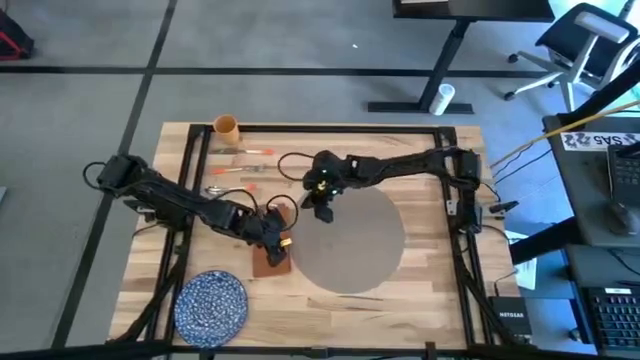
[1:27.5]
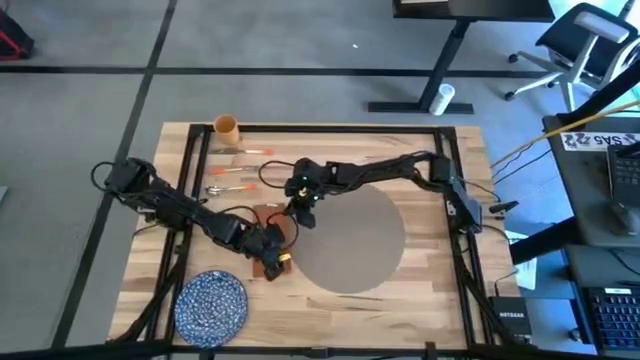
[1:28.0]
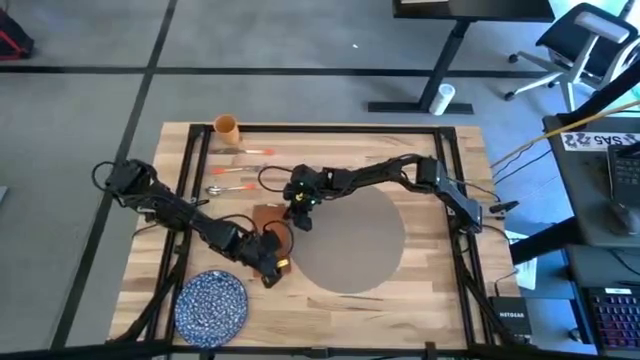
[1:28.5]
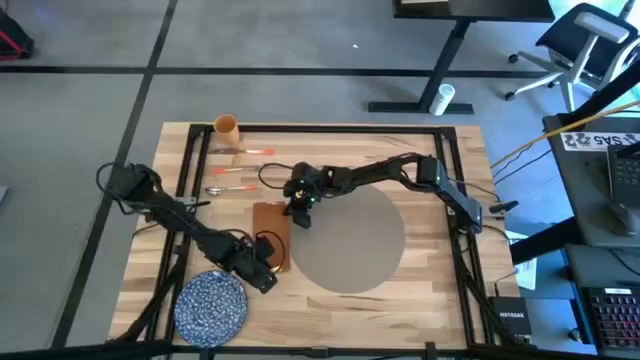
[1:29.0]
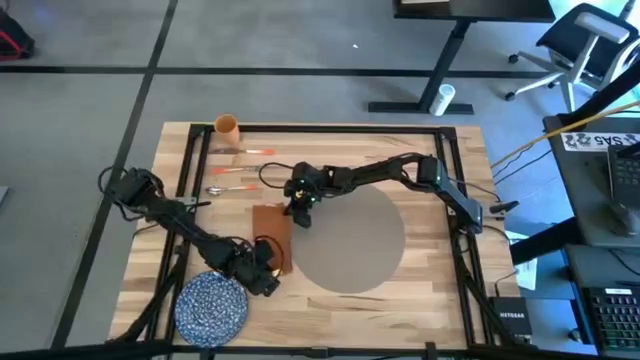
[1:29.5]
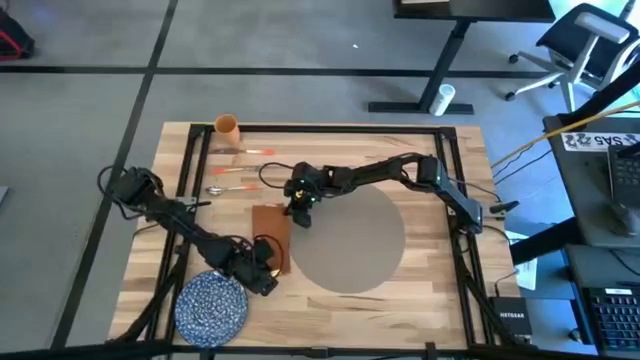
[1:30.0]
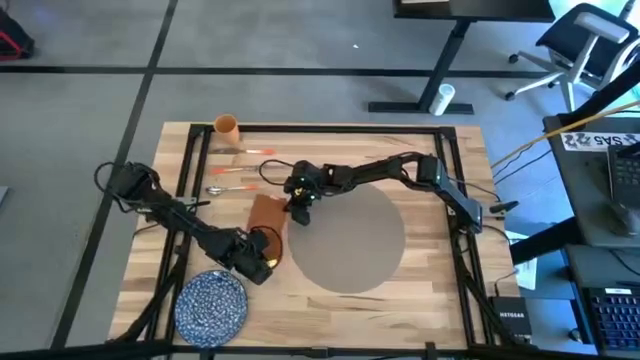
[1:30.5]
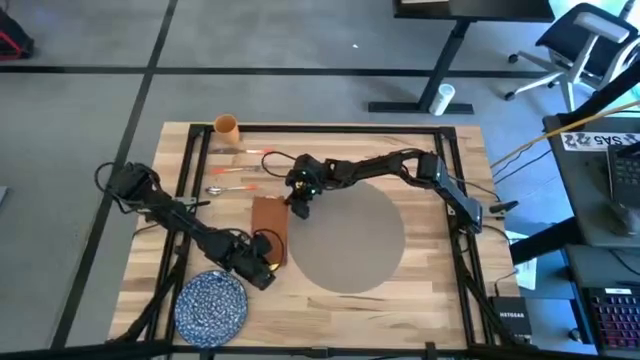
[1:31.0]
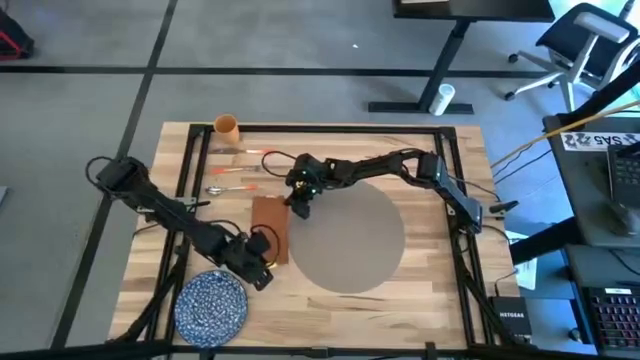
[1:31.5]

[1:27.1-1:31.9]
Task: Set table place
Adjust the orange napkin

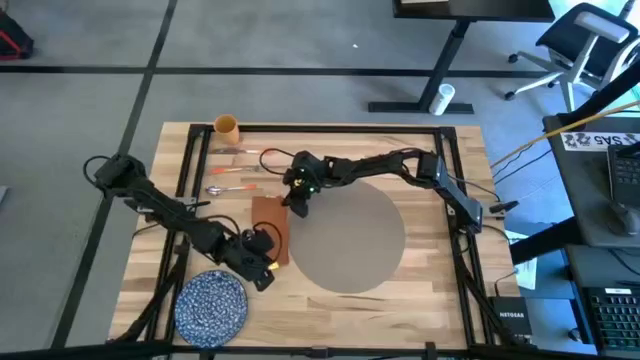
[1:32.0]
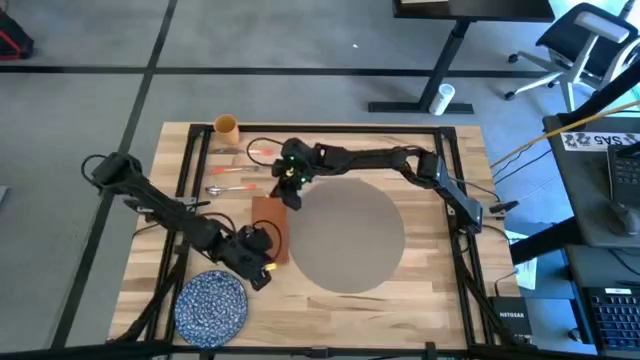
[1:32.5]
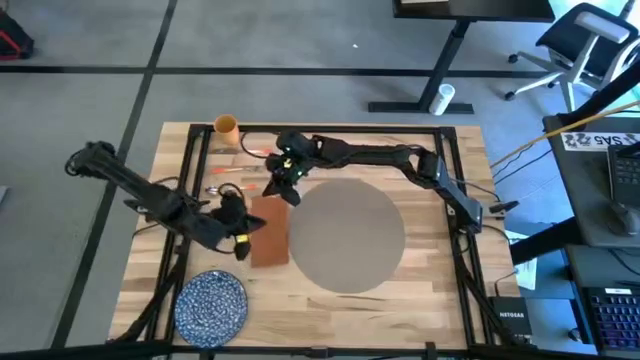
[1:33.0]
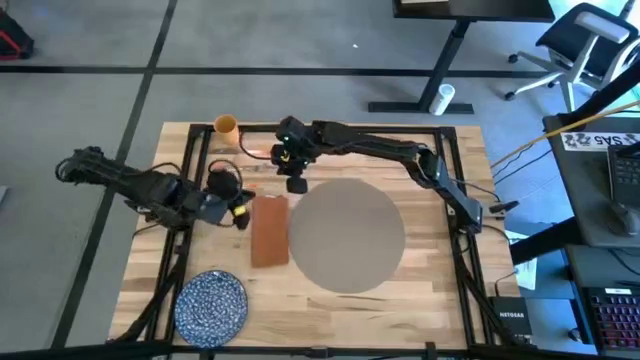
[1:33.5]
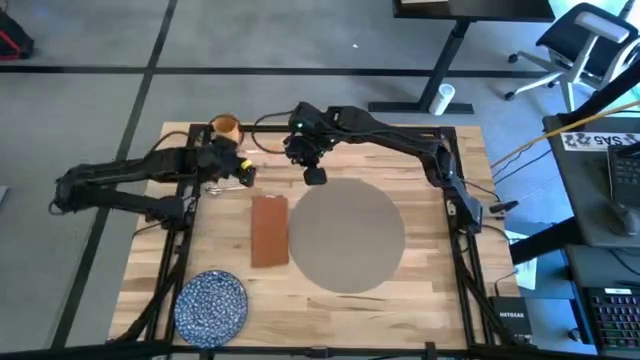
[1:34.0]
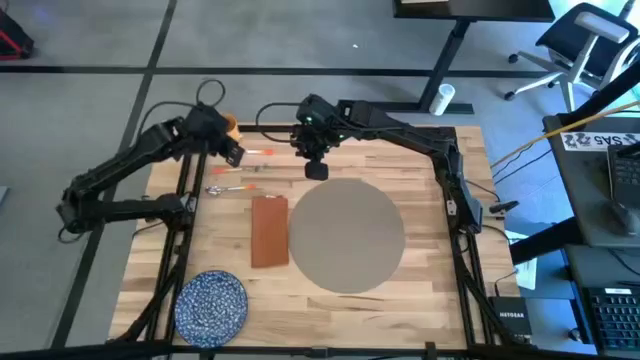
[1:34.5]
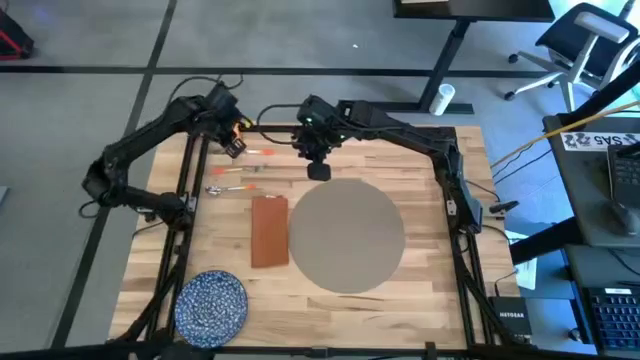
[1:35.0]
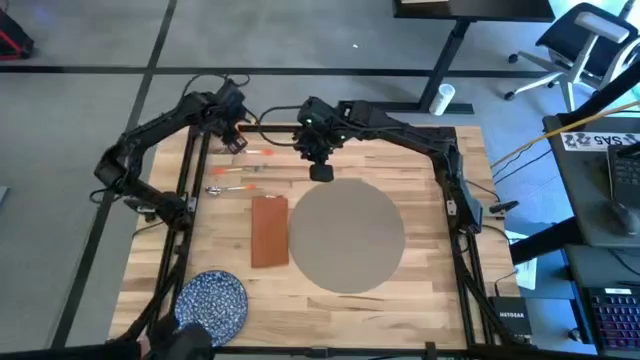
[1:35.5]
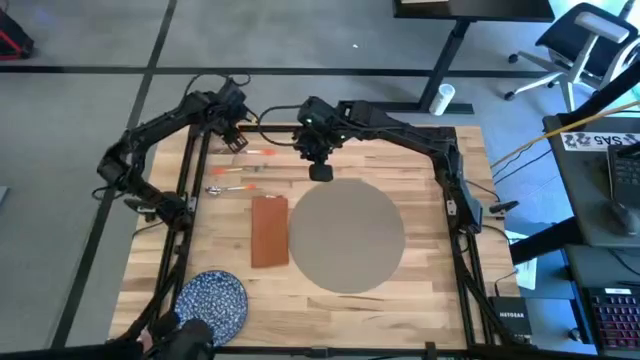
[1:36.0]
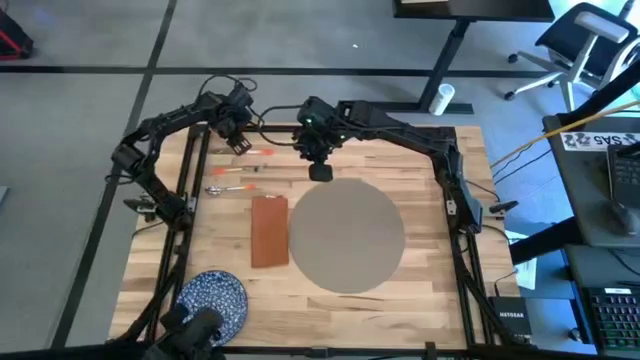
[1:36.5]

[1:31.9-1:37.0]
Move the yellow cup to the top right of the table

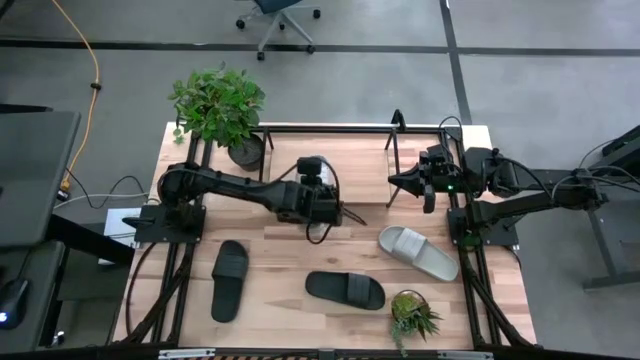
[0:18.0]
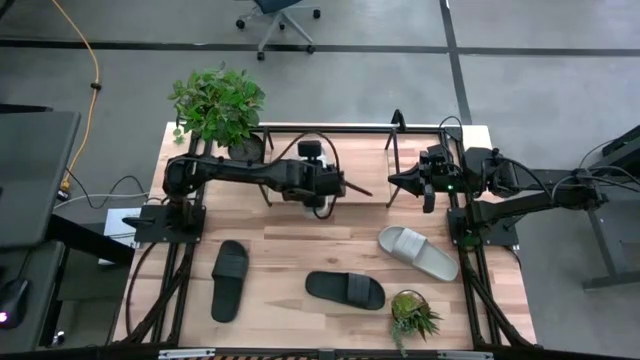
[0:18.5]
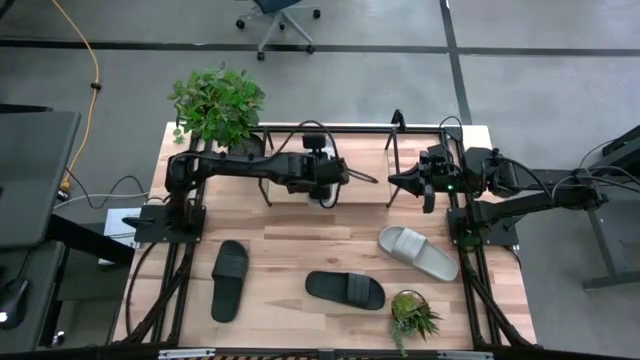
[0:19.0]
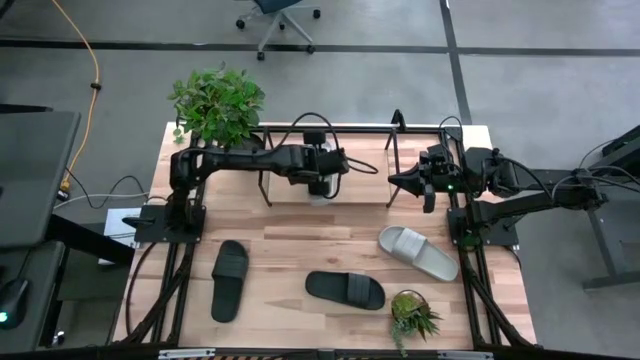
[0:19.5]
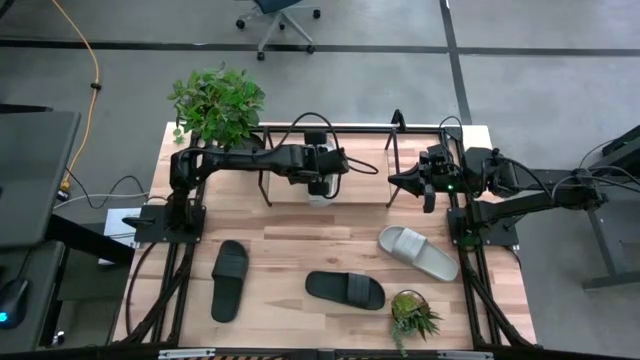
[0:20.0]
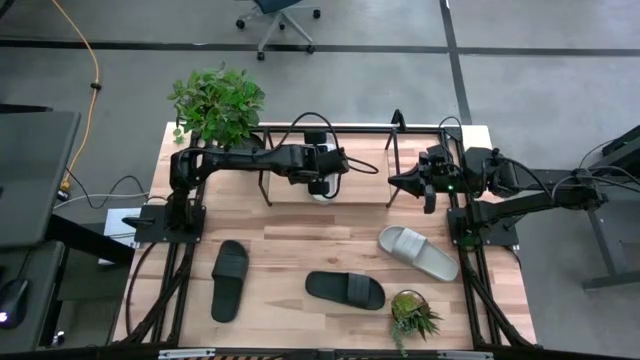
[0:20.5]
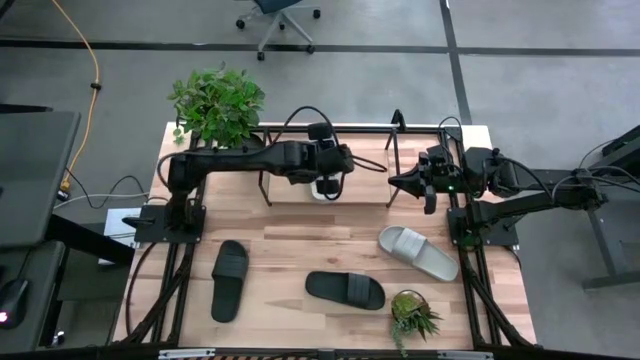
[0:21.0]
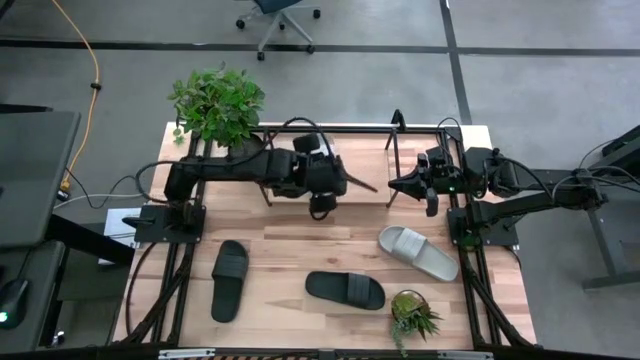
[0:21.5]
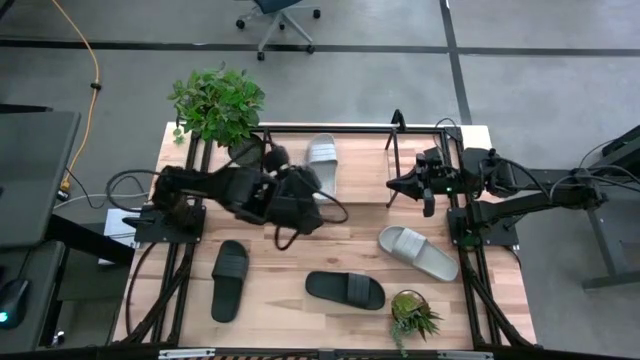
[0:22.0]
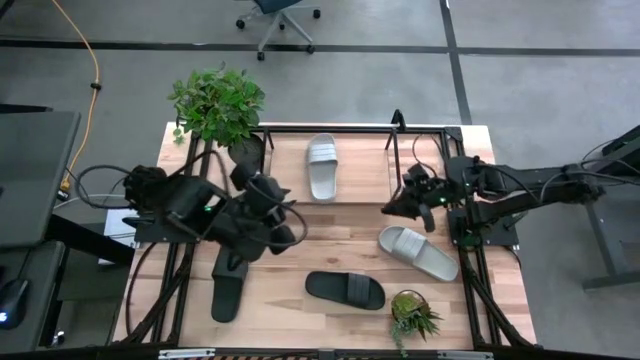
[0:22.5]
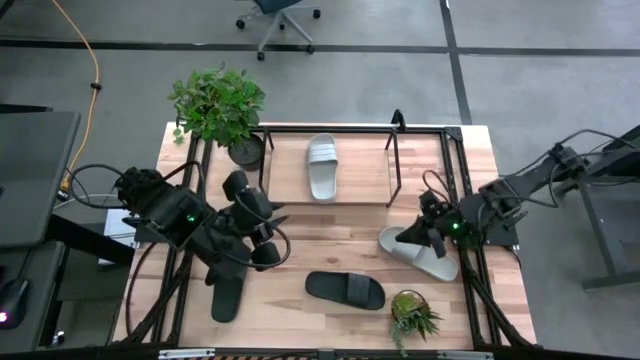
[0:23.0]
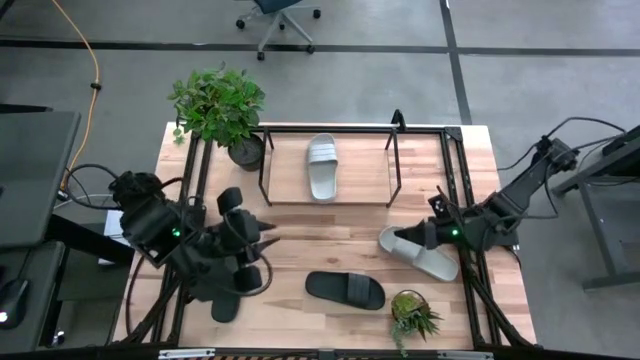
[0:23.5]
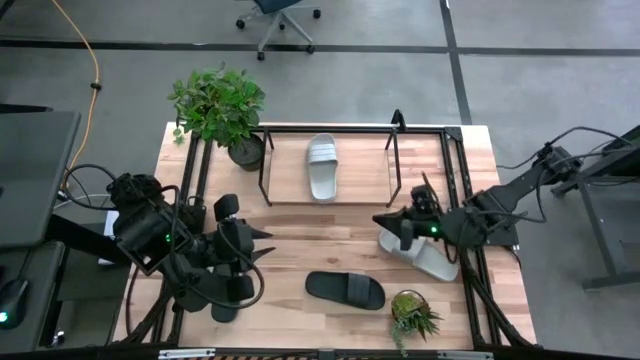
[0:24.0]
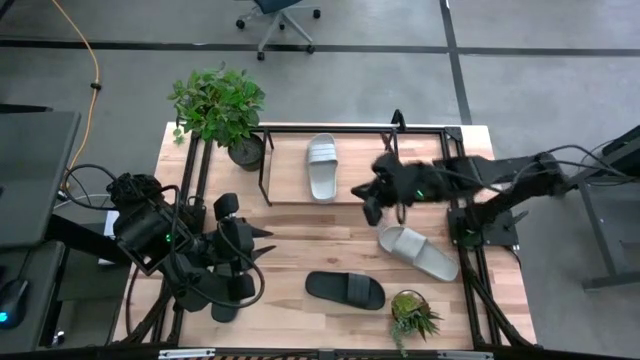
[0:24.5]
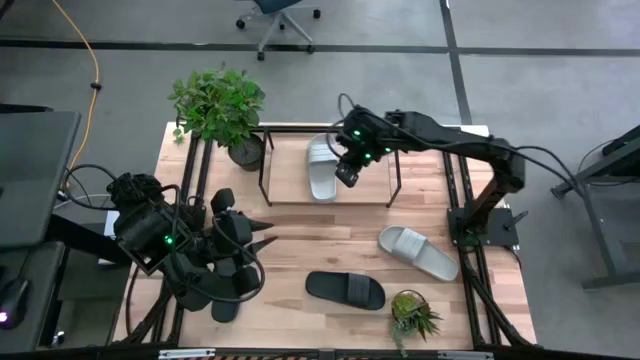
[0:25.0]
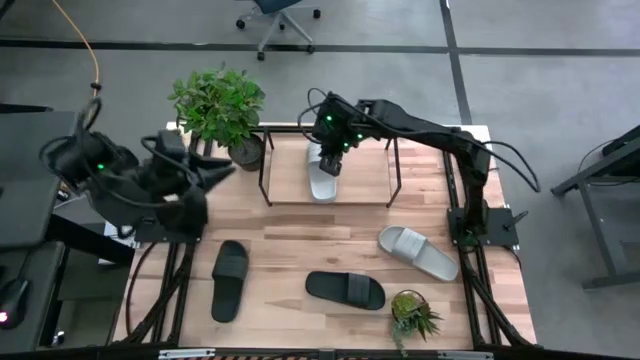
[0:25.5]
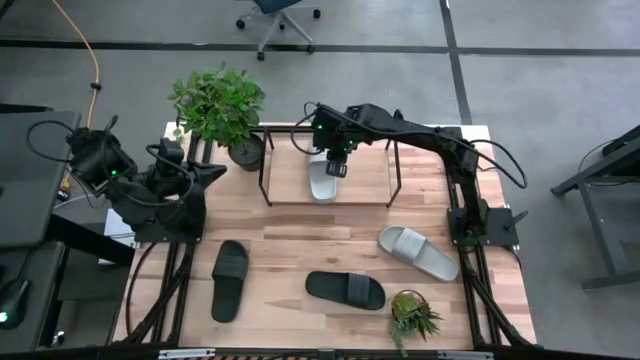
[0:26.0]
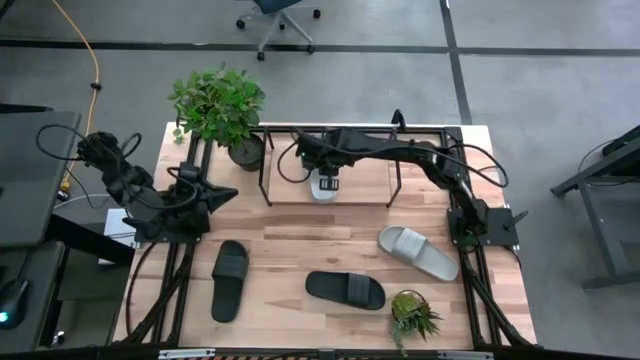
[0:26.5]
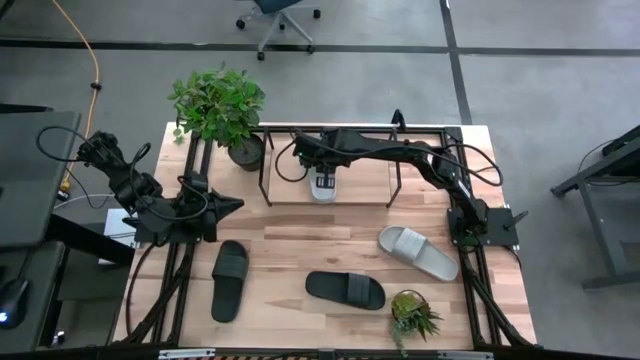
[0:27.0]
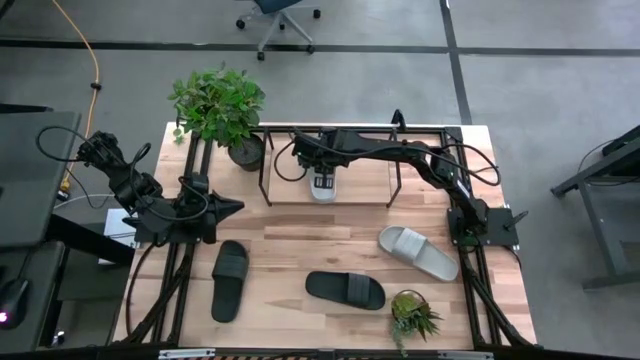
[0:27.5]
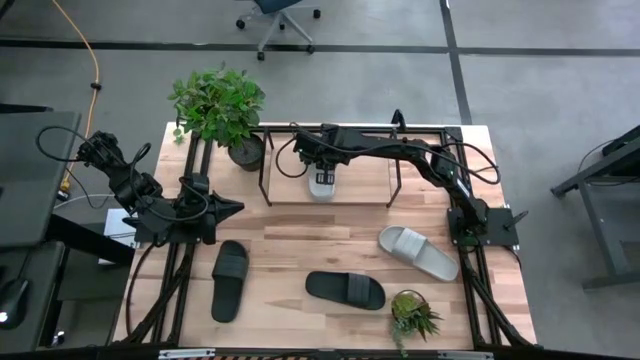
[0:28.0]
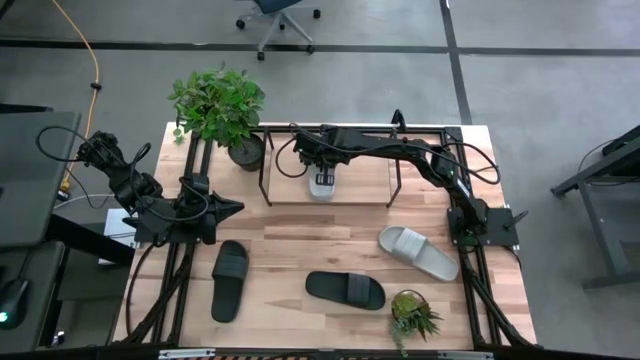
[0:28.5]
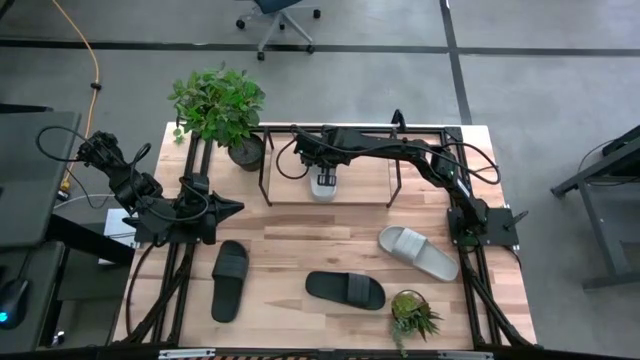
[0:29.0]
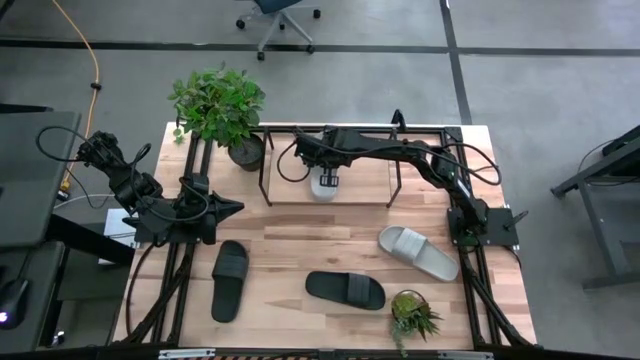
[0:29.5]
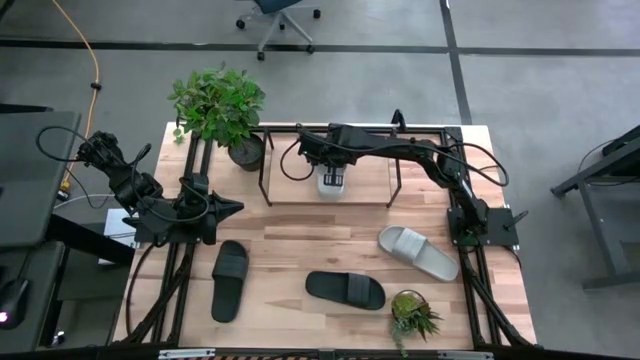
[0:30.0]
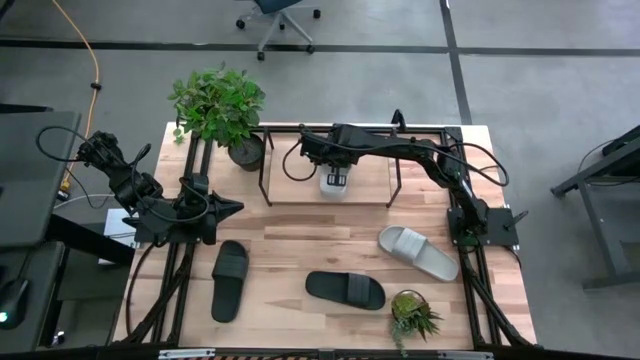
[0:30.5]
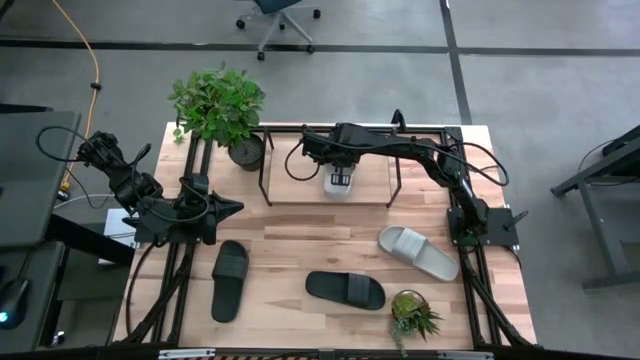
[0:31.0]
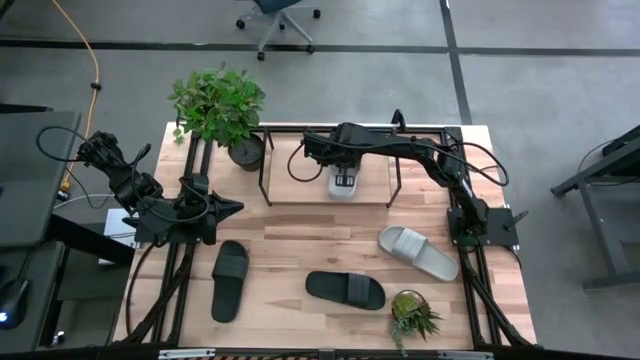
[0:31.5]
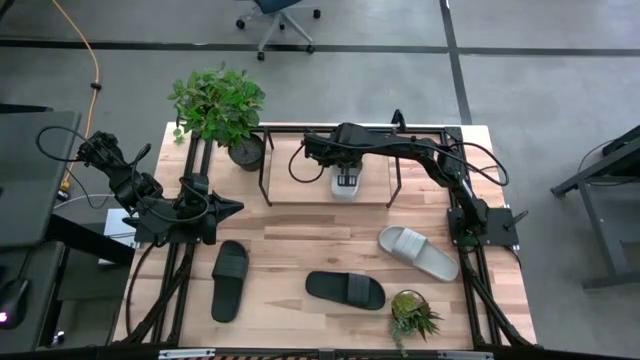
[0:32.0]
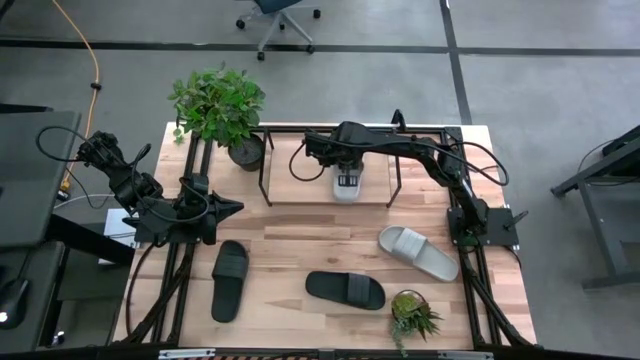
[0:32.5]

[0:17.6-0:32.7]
Task: Pick and place slides into the shelf
Put the left gray slipper on the shelf
